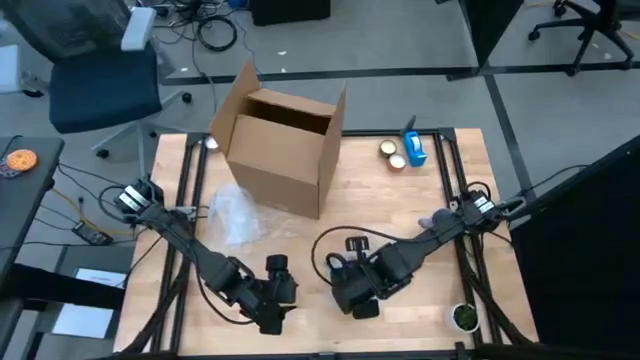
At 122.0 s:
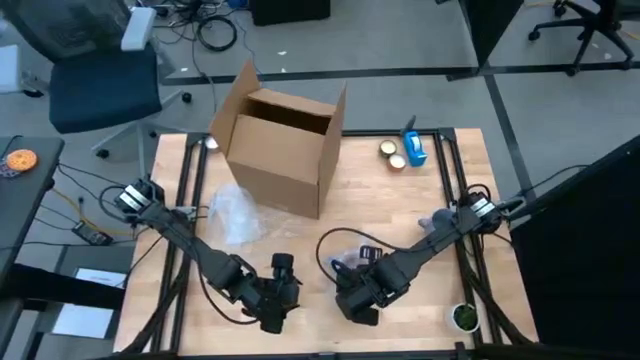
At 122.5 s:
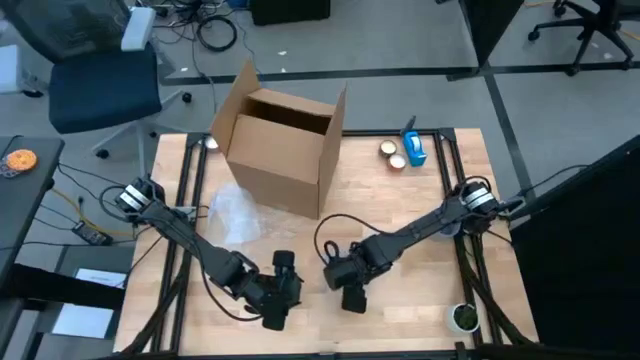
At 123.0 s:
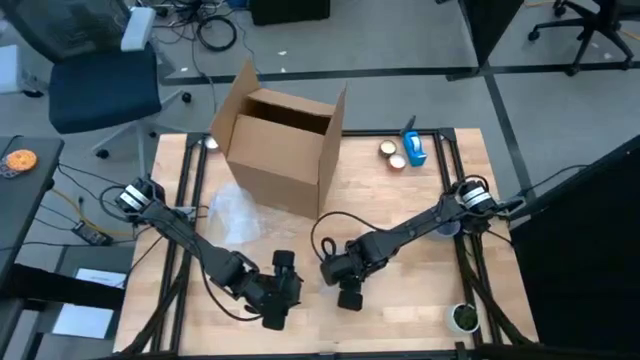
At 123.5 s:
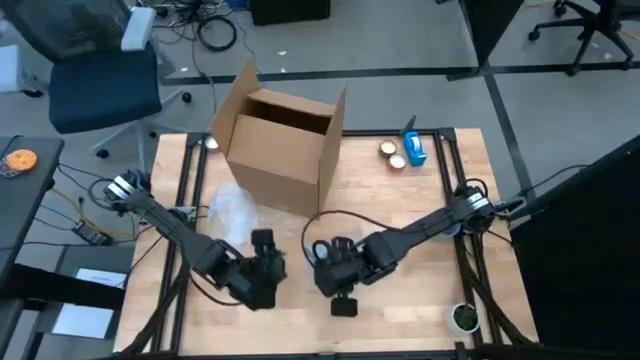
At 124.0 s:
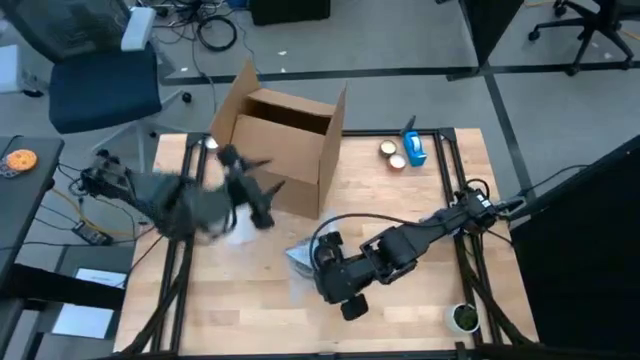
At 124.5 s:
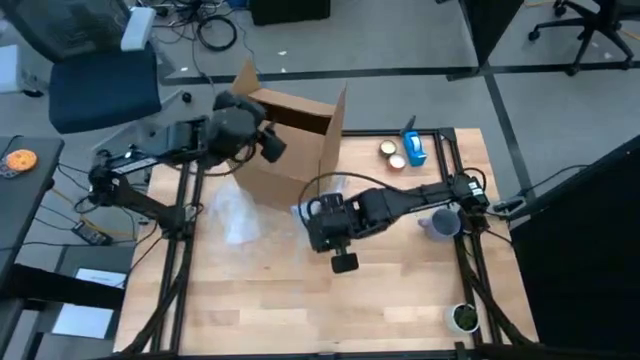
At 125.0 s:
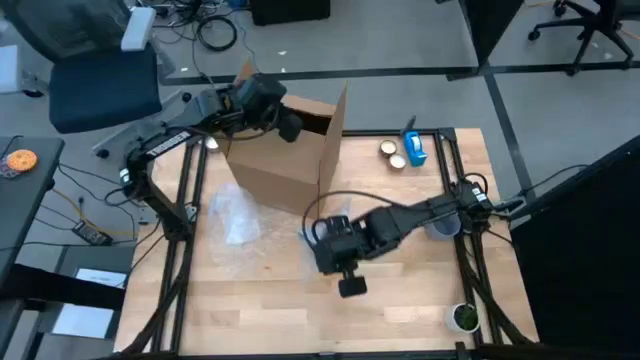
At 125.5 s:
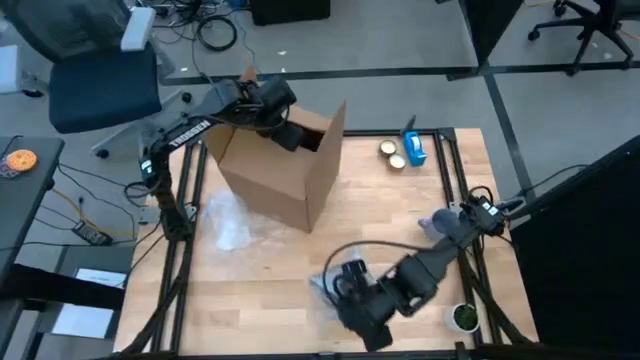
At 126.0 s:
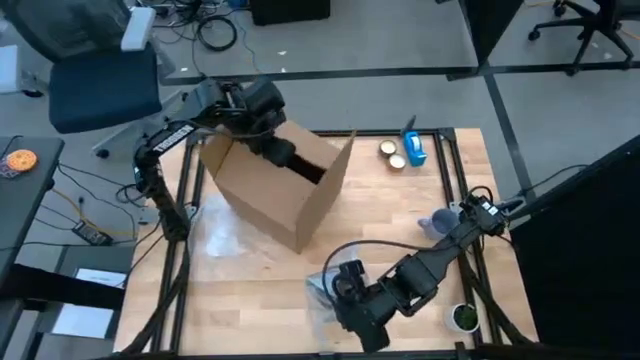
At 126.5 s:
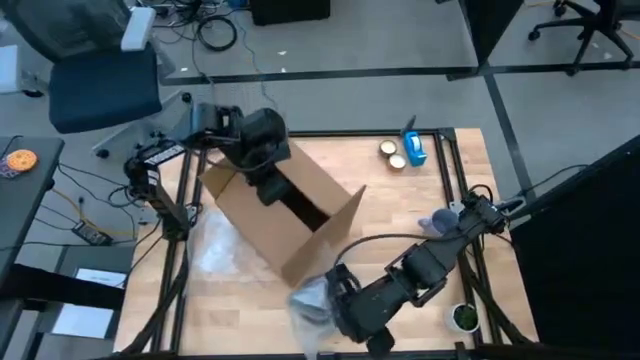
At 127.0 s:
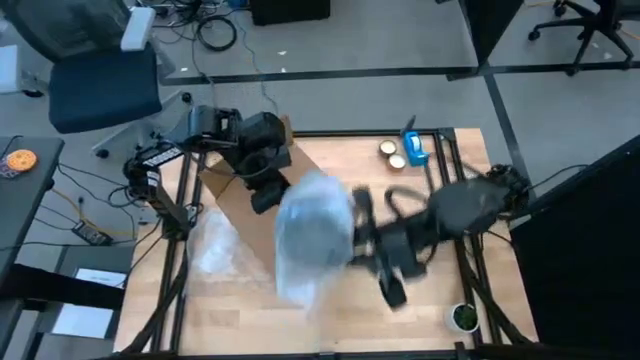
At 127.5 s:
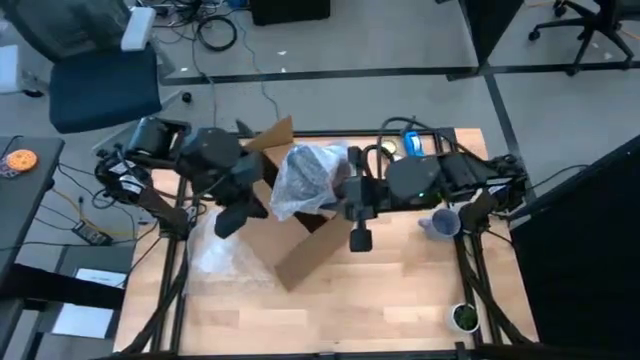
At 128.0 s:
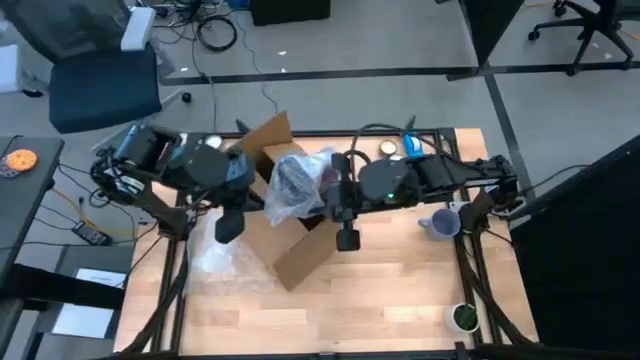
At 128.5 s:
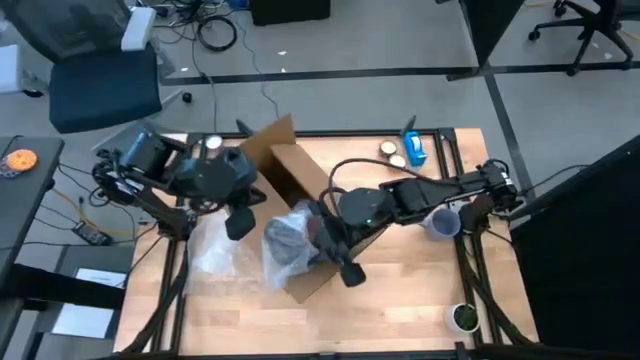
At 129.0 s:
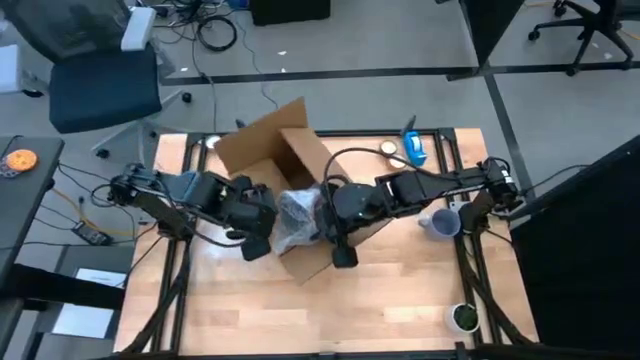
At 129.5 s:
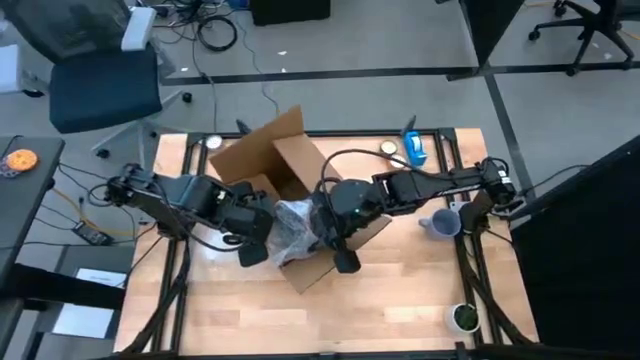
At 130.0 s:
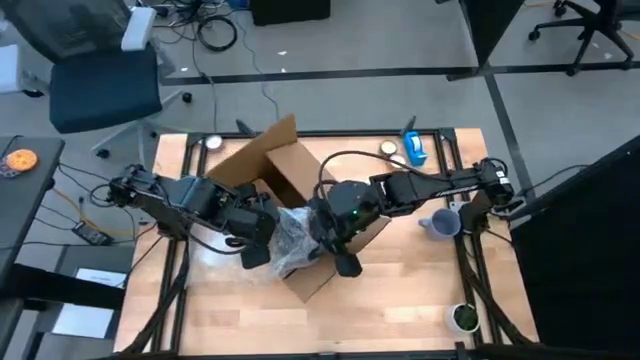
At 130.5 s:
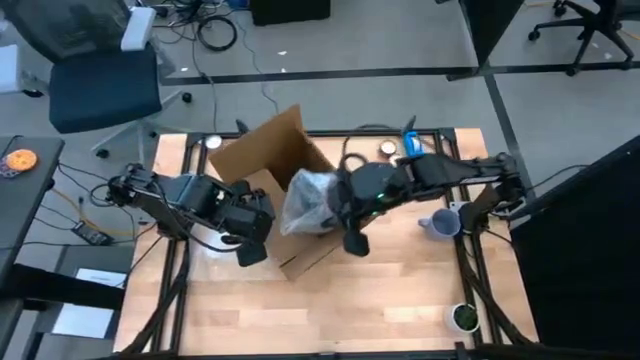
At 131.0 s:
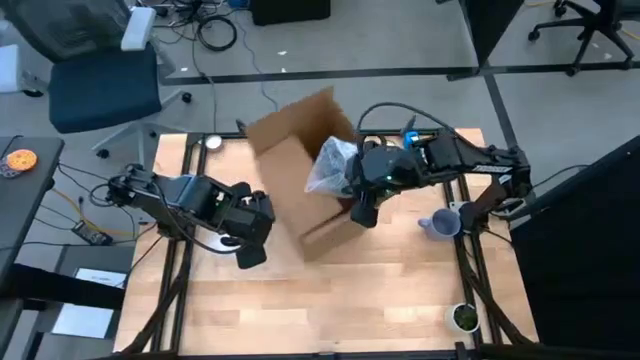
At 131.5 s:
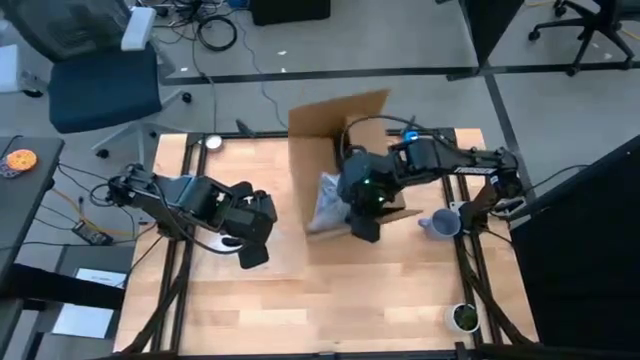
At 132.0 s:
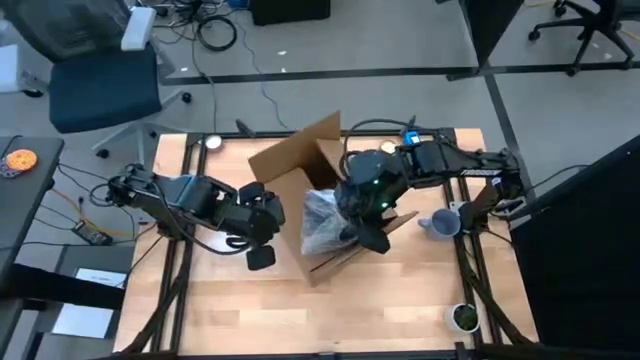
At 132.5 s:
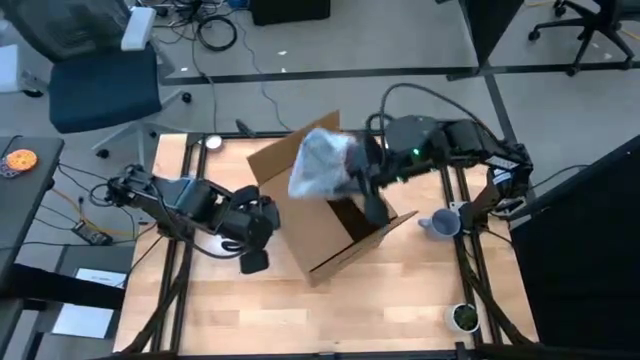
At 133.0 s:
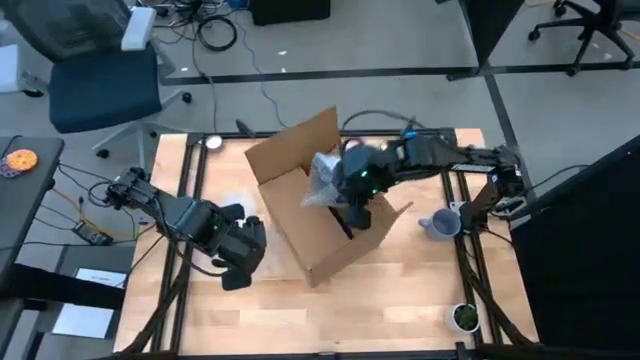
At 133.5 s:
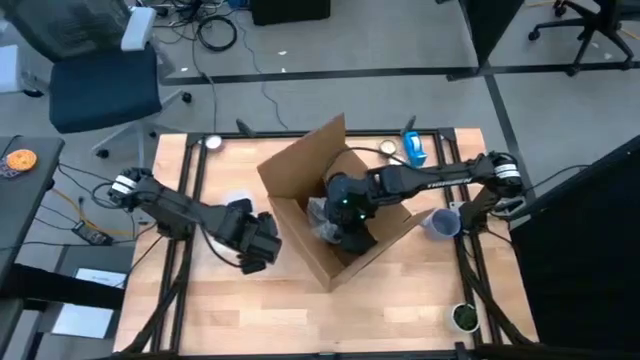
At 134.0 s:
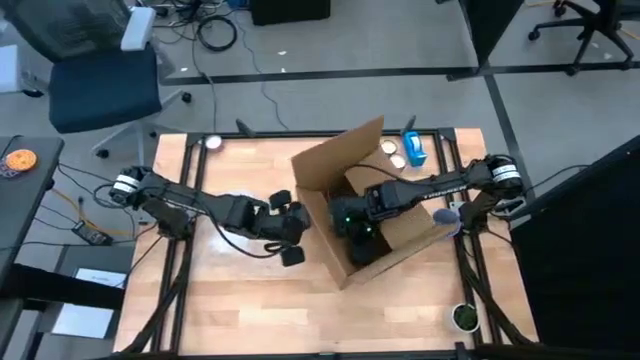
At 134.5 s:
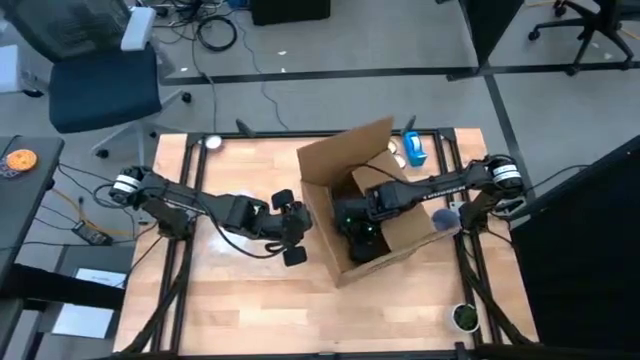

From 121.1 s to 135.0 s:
Task: wrap mug
Put the wrapped orange mug into the box

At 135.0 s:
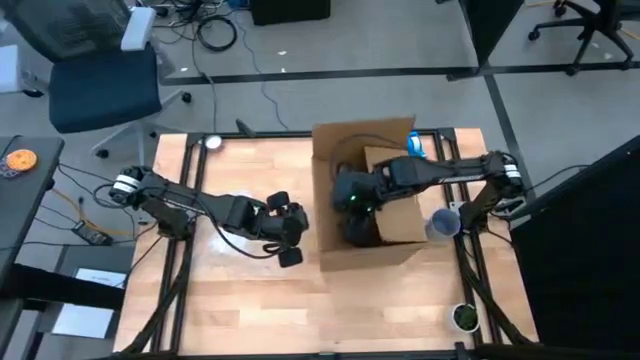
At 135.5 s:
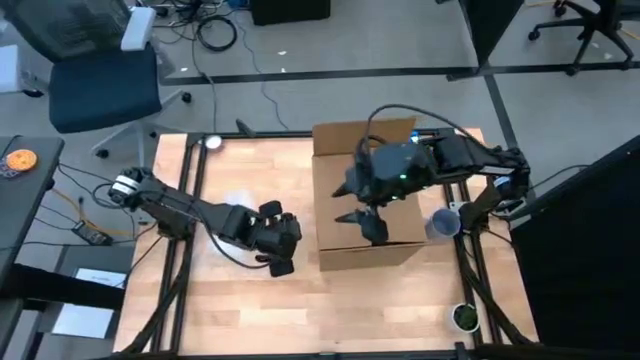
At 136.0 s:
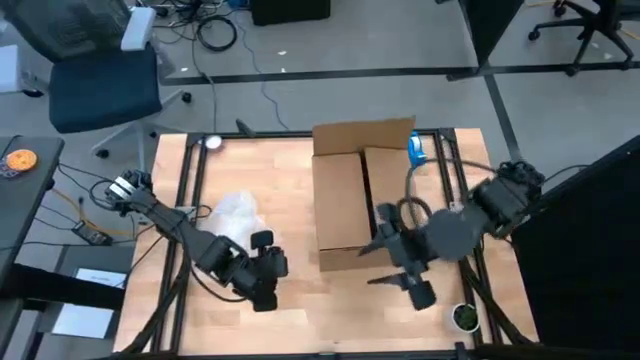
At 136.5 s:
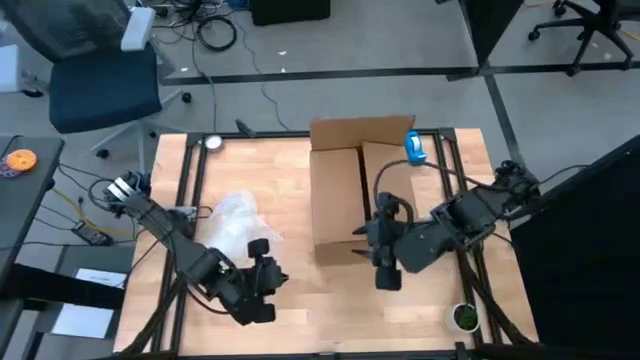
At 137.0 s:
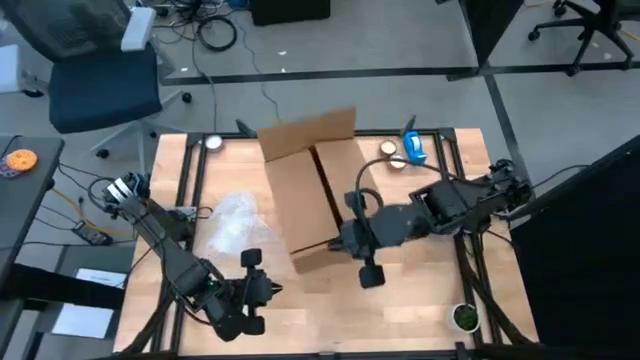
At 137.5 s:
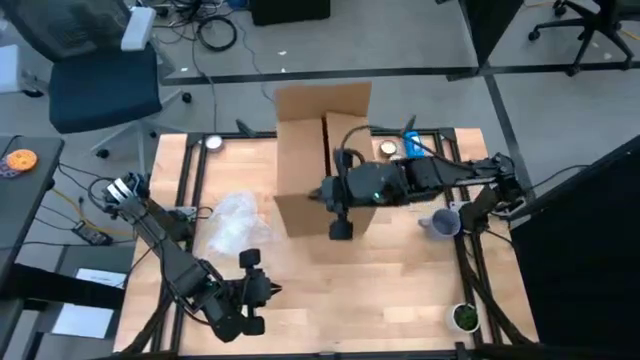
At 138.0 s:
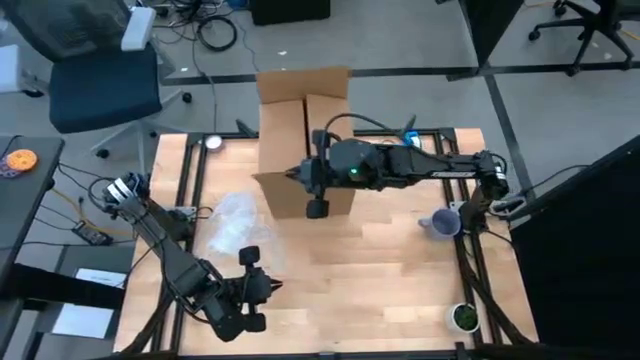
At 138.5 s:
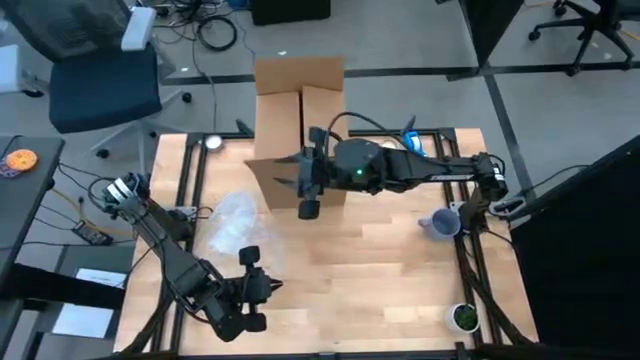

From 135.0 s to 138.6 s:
Adjust the box

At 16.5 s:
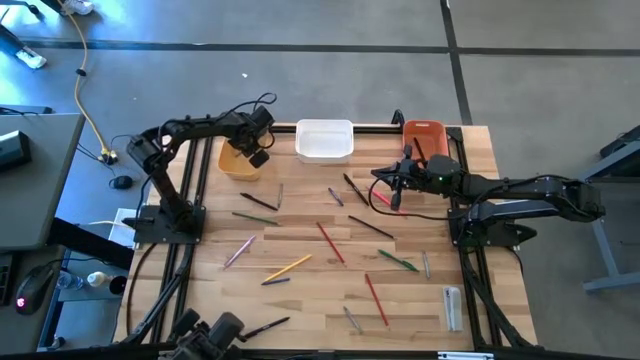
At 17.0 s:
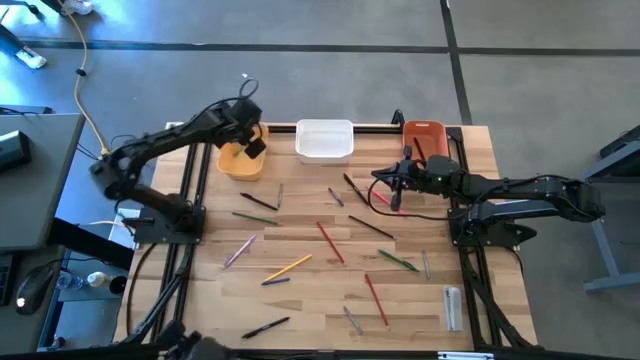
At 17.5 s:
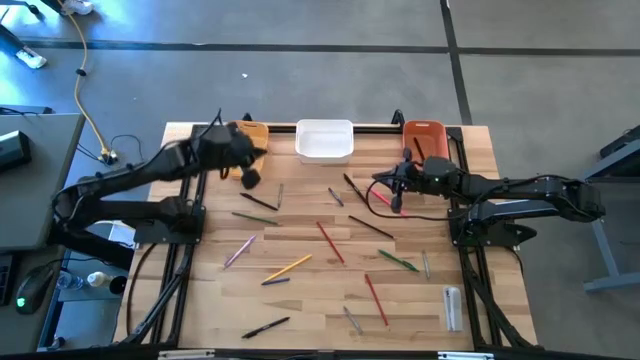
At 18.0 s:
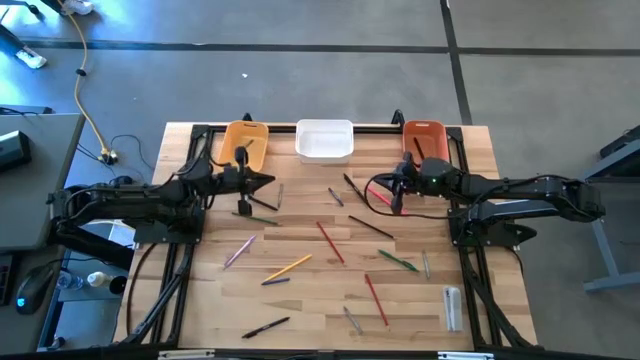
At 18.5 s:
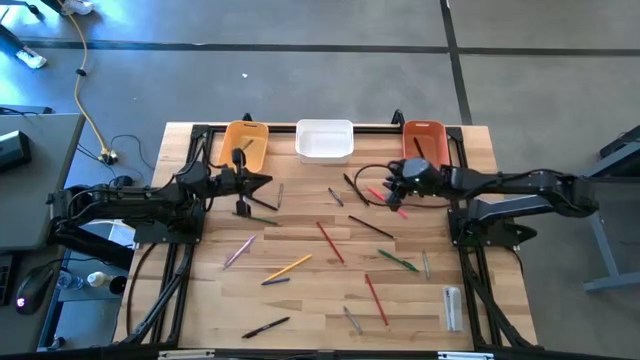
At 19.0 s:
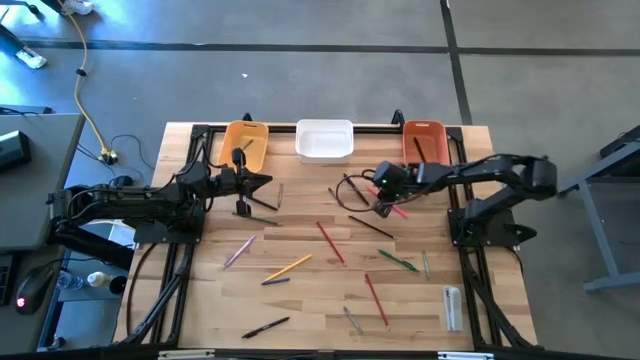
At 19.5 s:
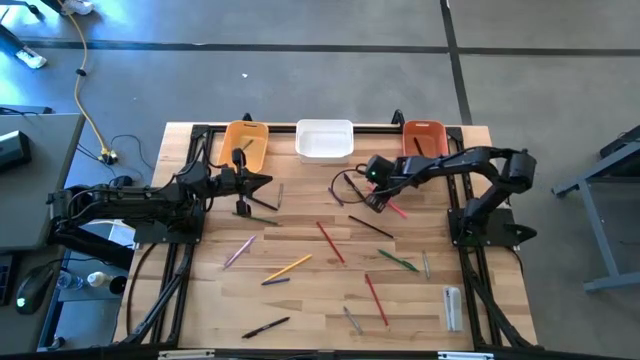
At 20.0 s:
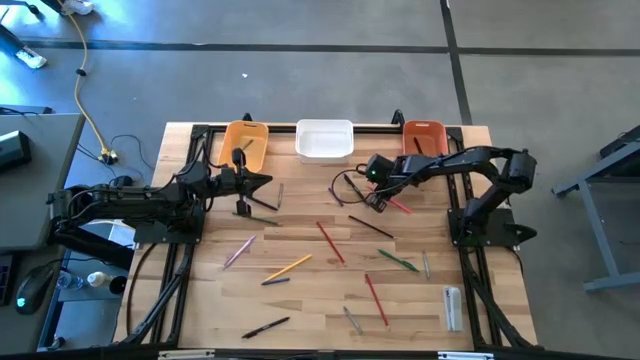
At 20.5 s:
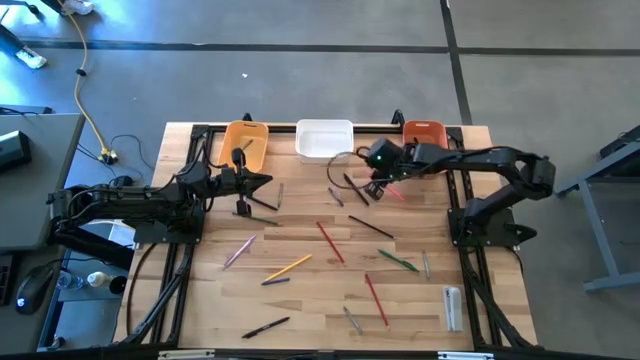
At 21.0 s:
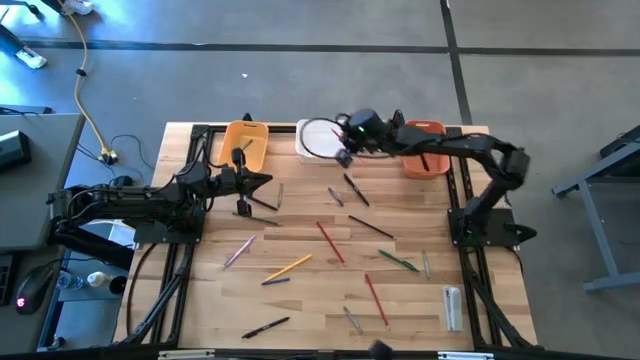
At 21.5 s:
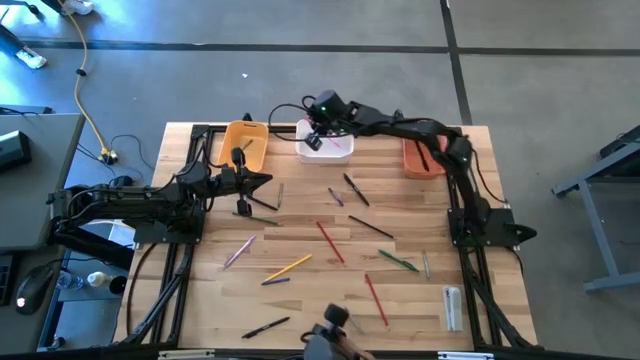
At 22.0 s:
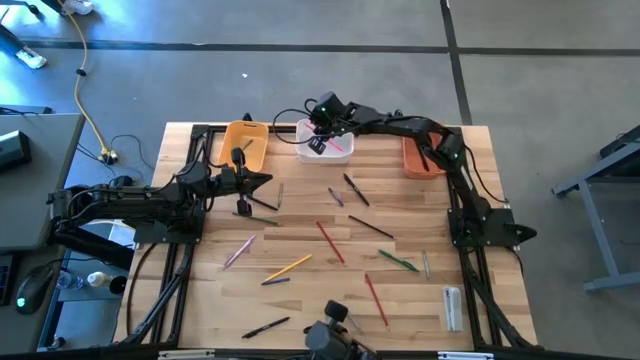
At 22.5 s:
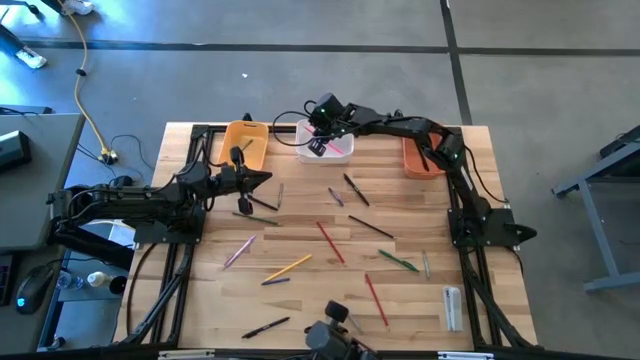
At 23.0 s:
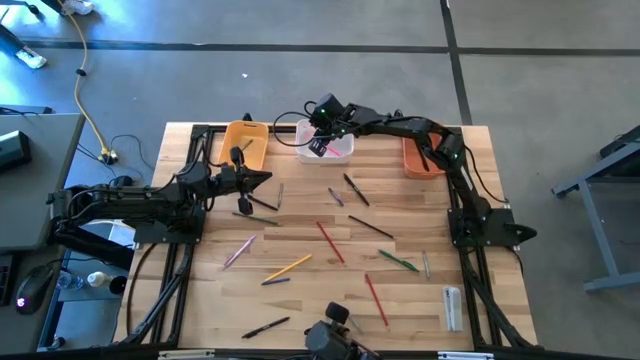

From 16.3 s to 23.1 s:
Task: Sort crayons/erasers/pens/pencils in bins
Put the pink color pencil into the white bin
